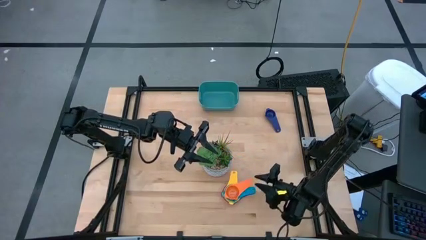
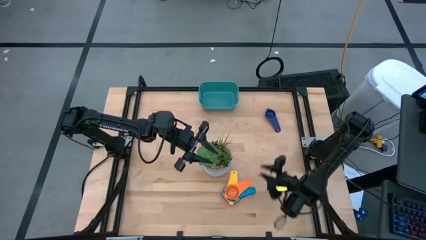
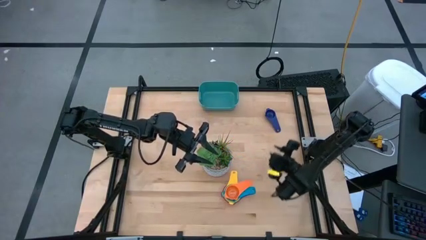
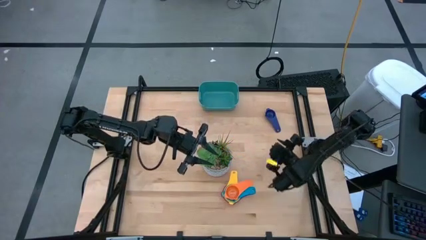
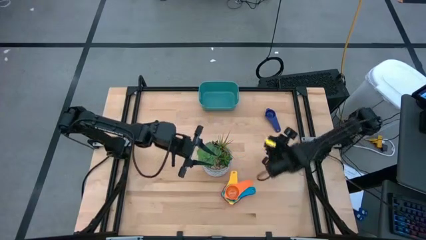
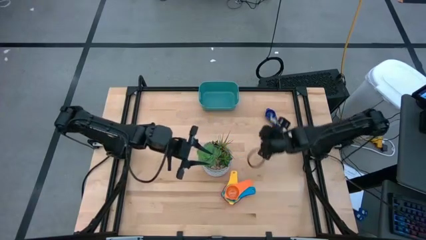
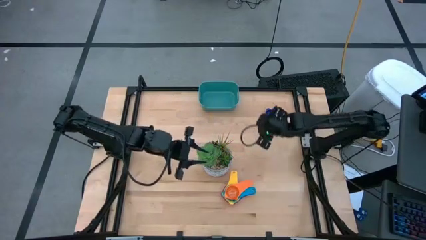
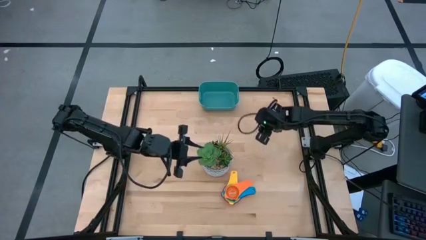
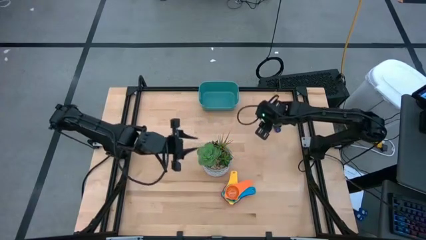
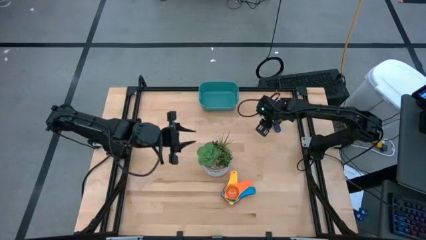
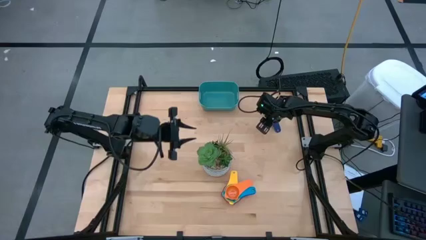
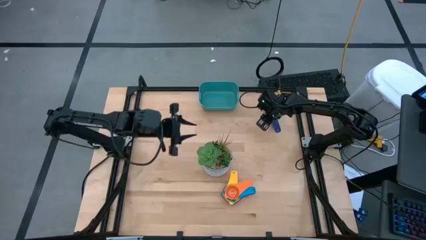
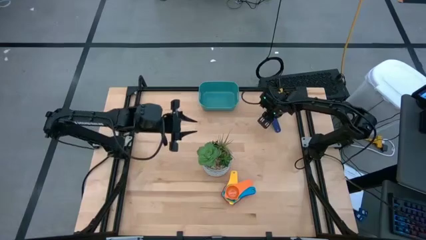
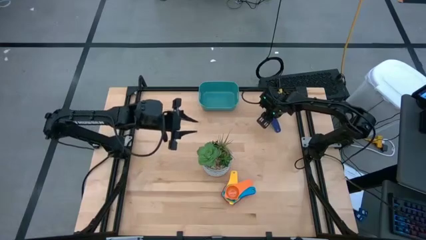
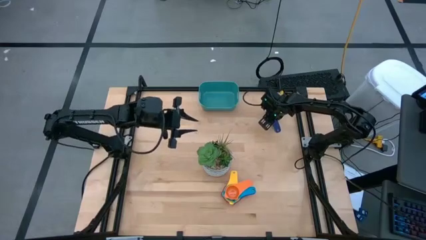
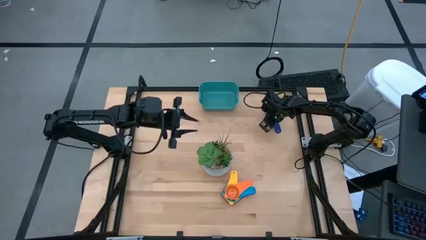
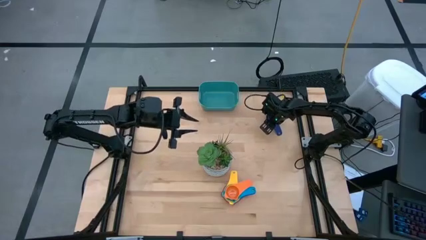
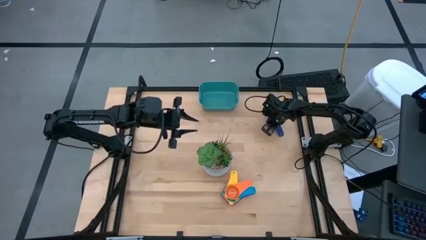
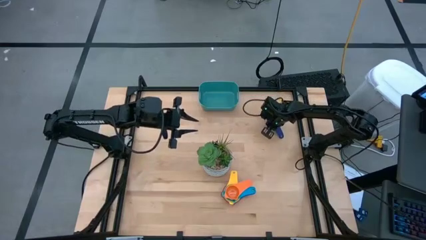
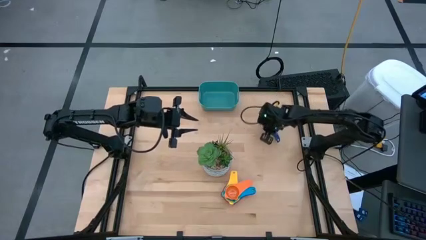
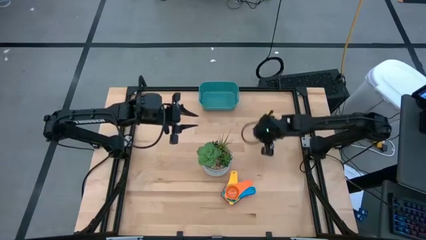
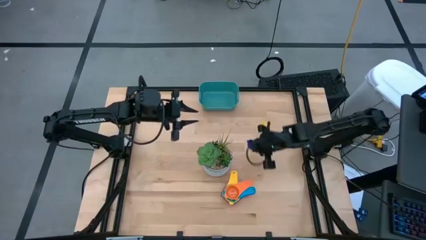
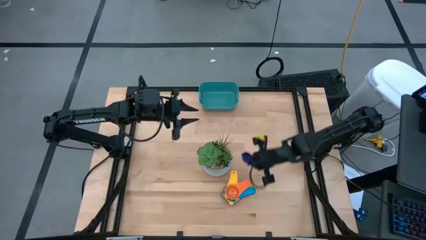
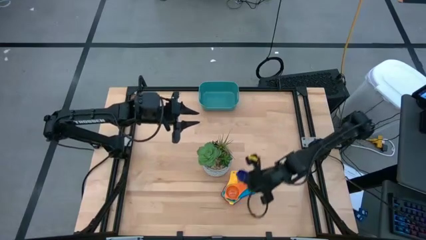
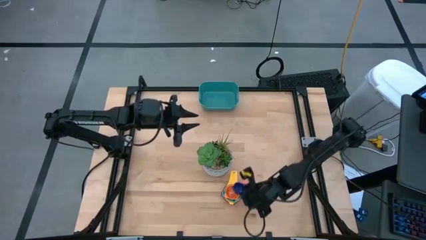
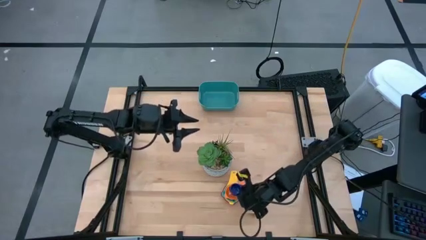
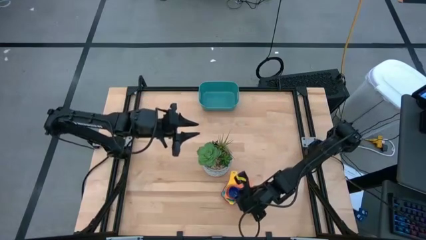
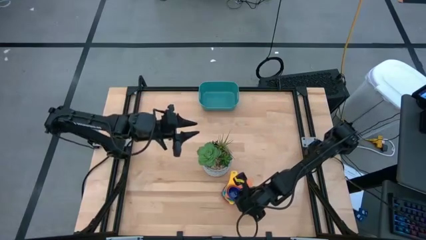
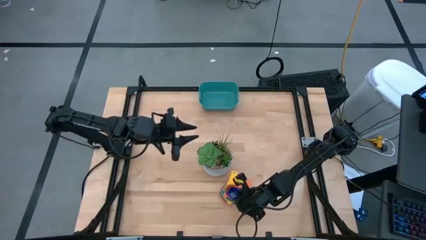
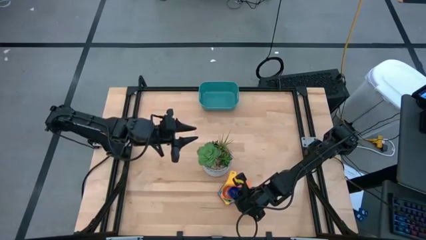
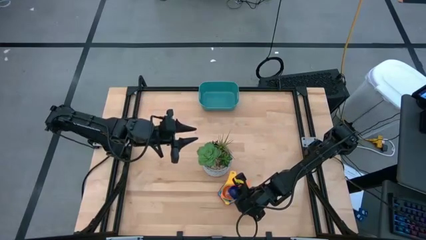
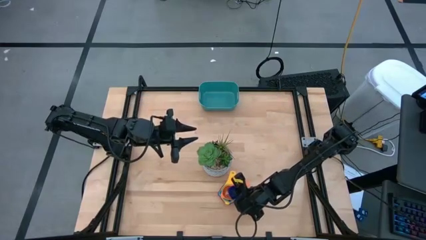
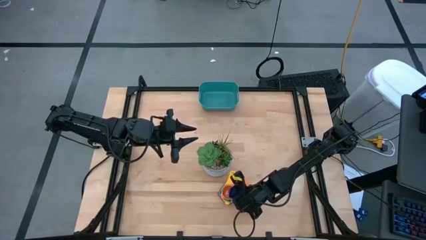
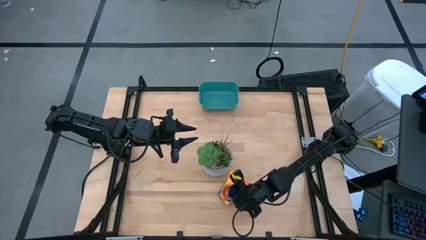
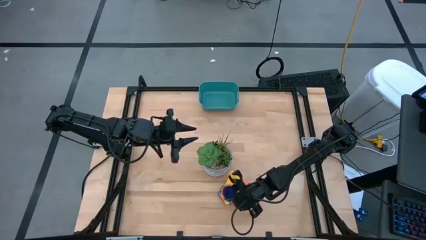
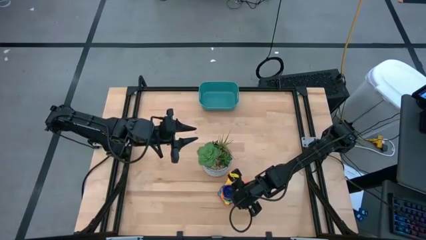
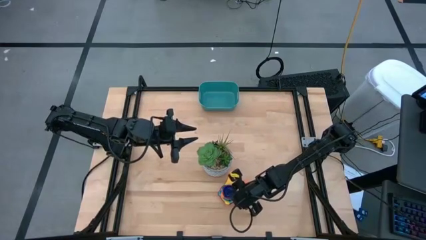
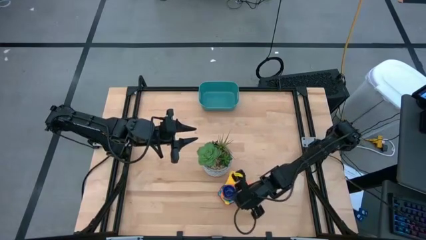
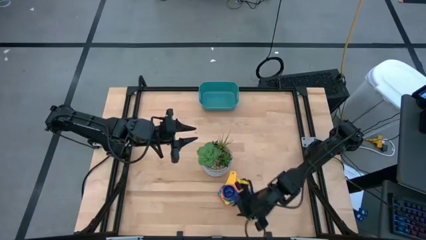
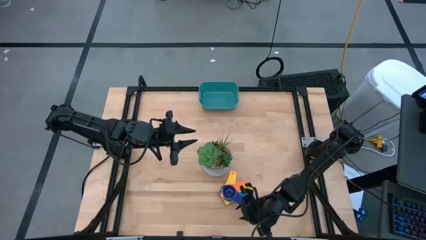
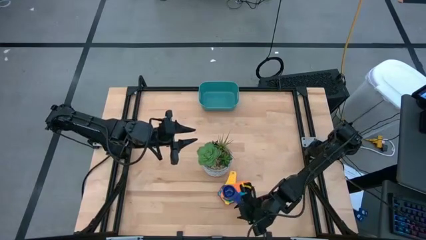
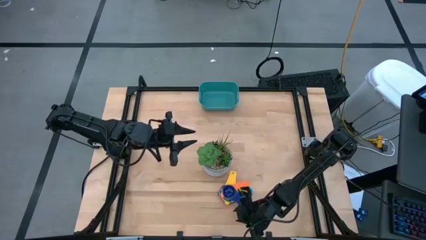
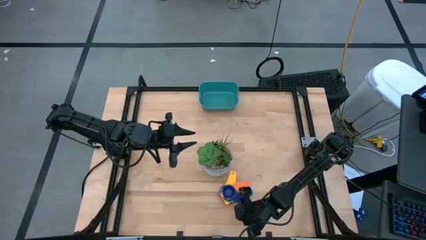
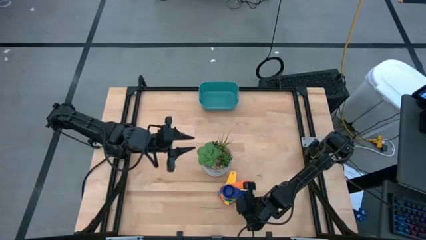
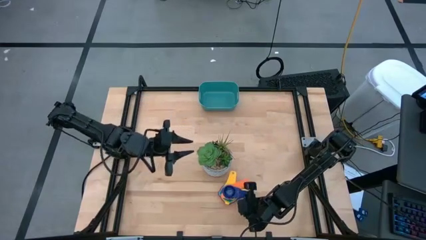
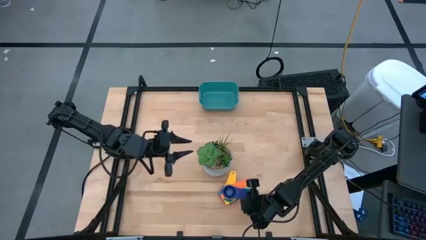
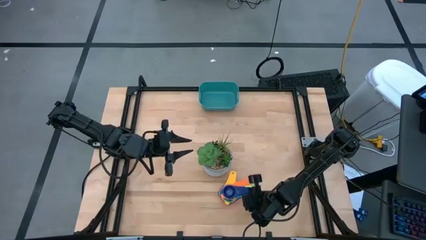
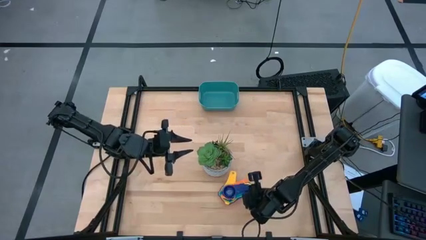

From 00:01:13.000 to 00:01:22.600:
Task: Nest measuring cups in basket
Stack the dark blue measuring cup into the orange measuring cup

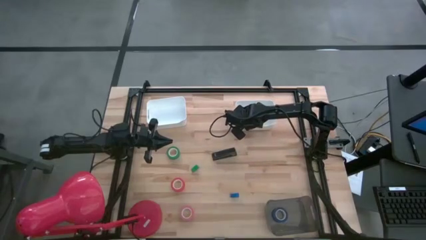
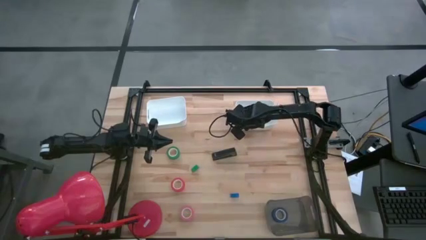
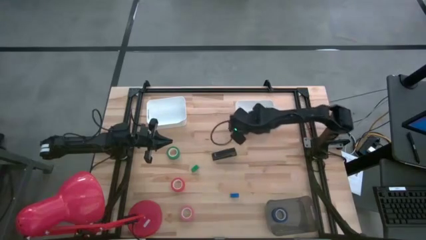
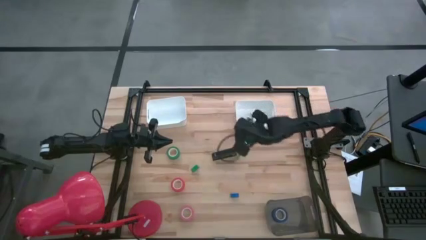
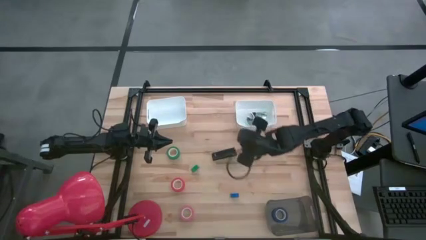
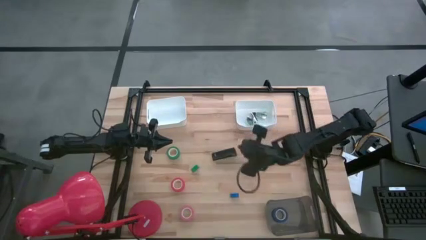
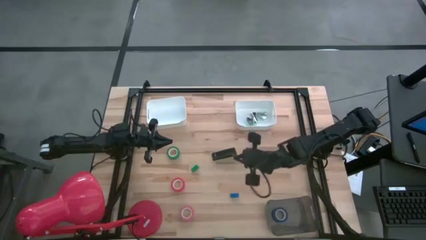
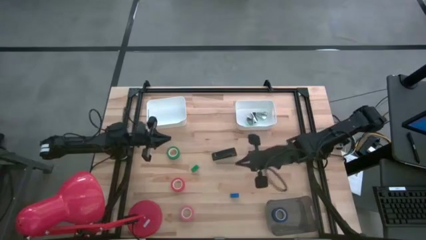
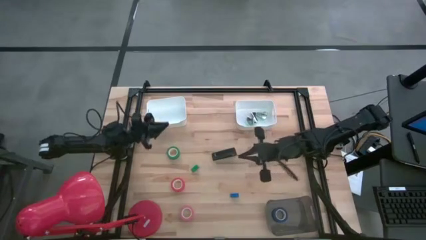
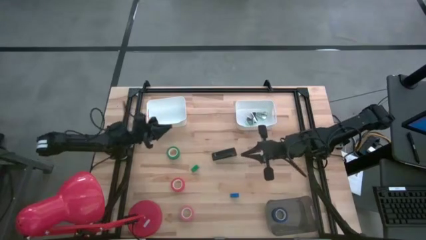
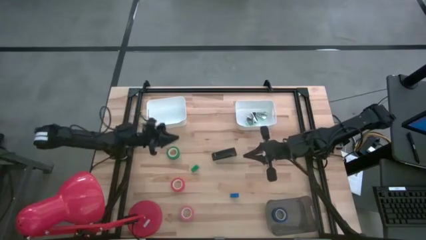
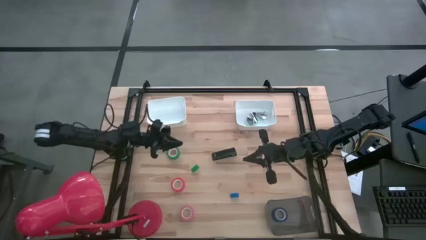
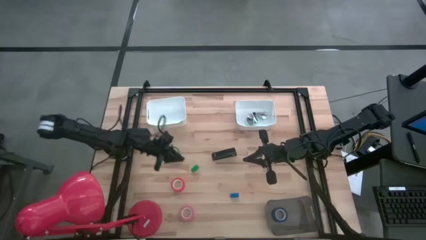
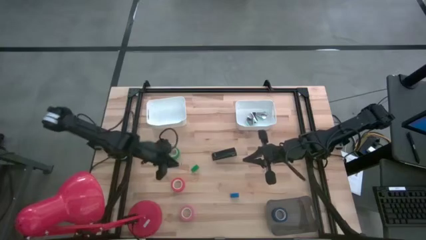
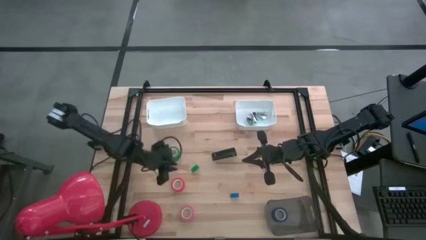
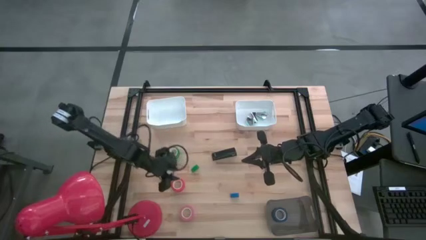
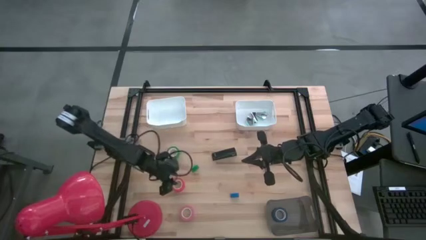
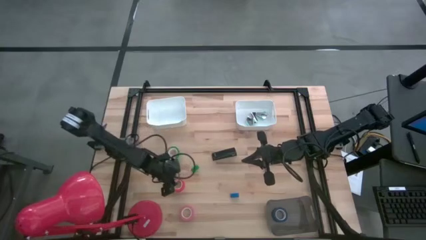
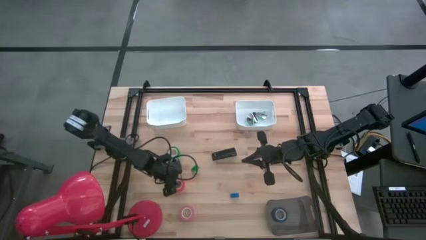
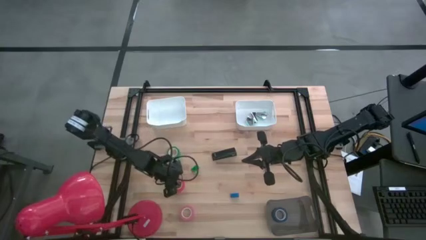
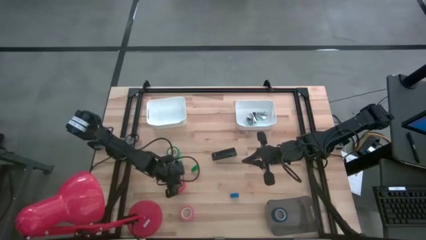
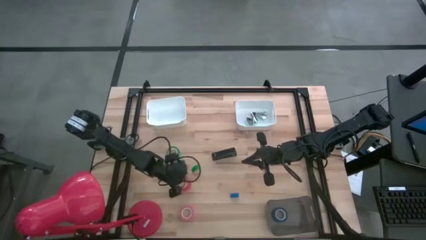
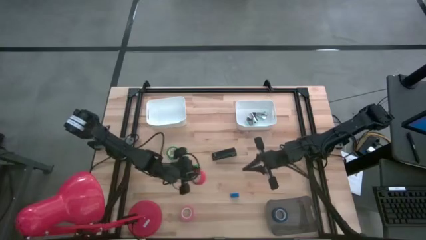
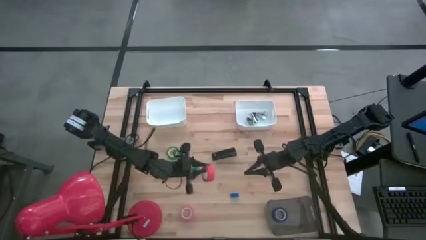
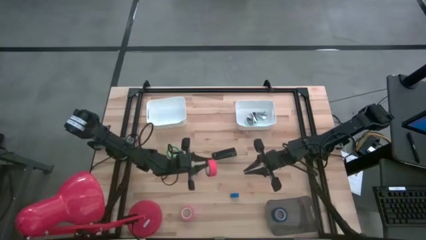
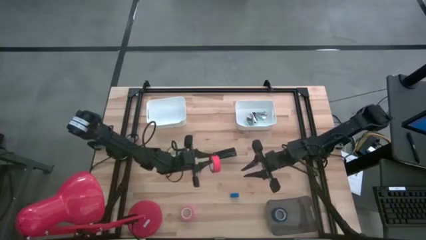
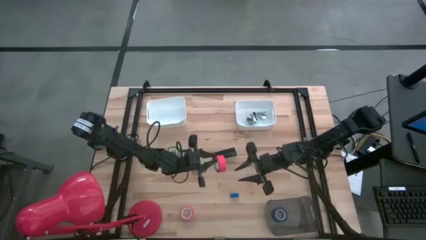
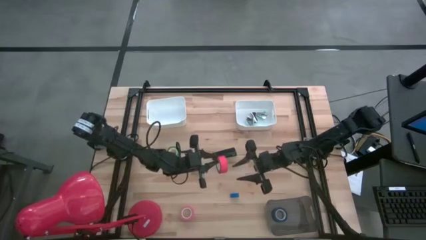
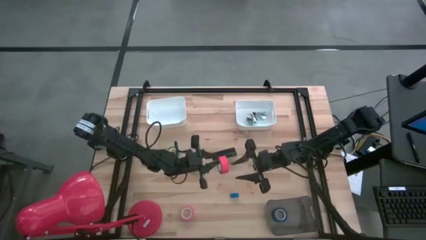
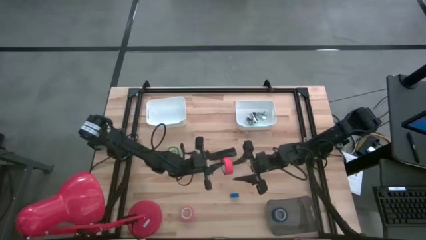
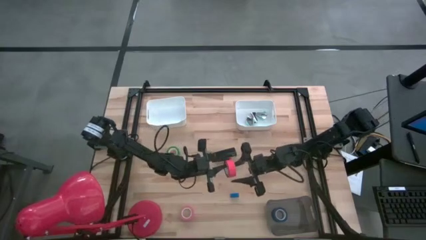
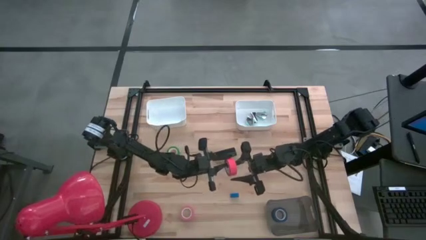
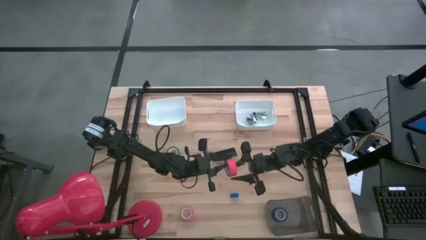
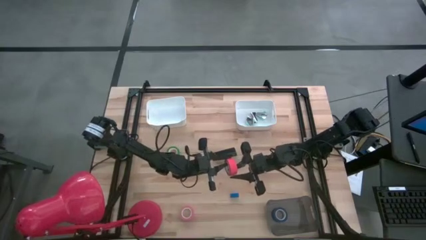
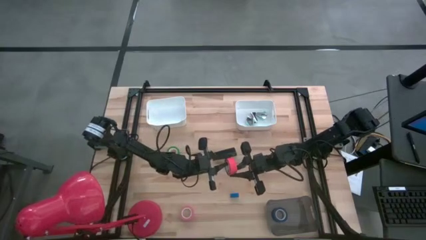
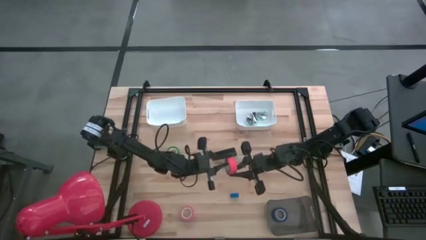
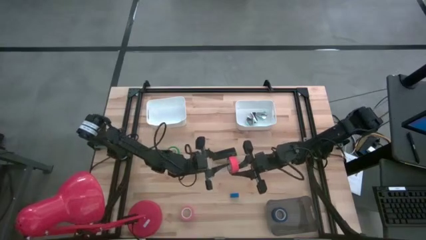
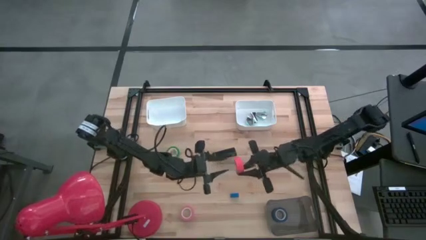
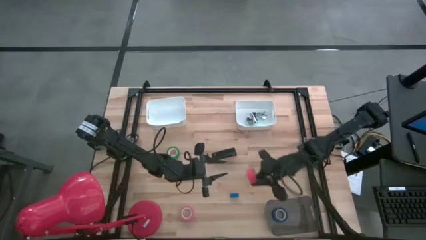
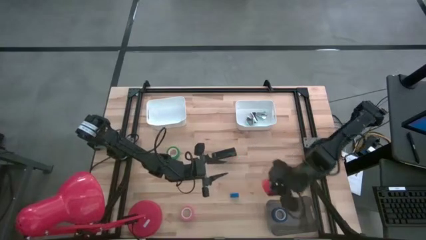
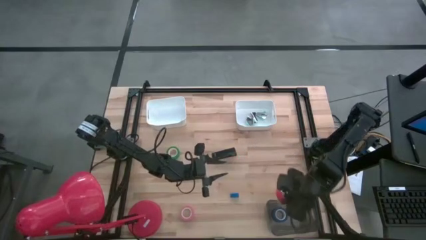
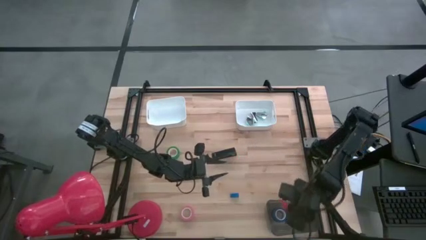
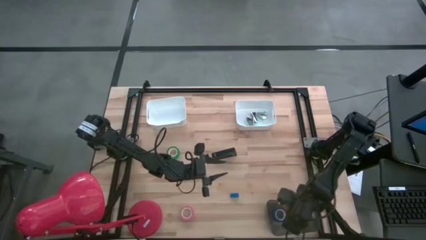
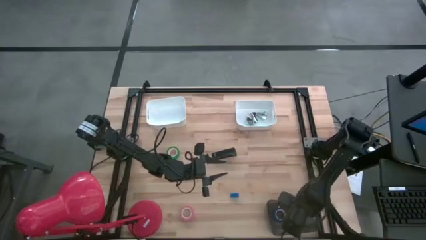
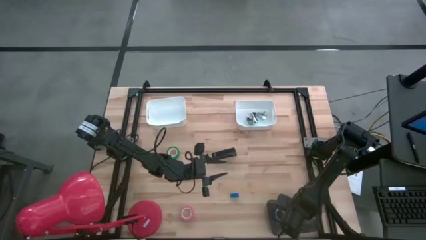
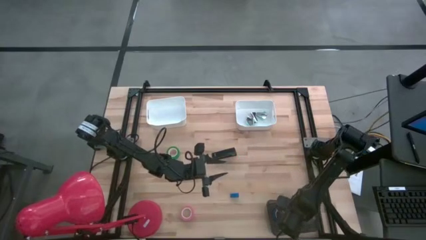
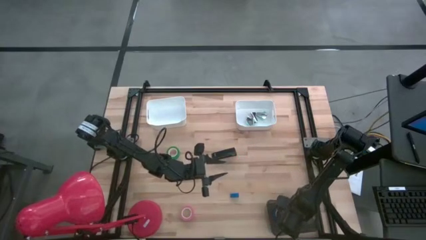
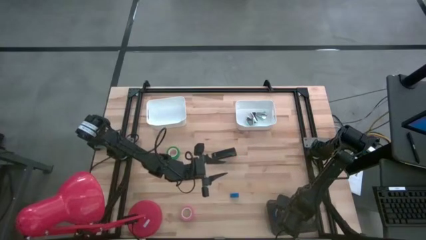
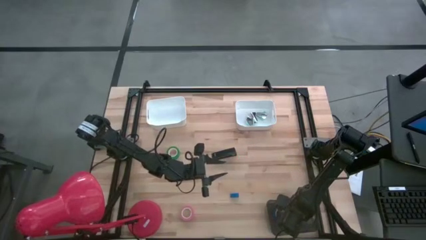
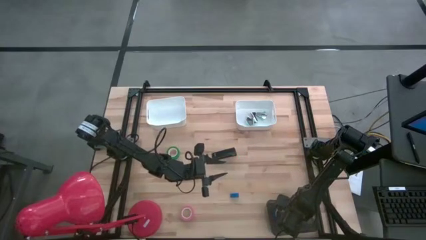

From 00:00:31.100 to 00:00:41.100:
Task: Pick and place Stapler, Stapler remover, tape
Put the red tape into the black bin
